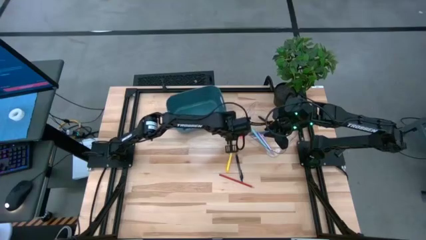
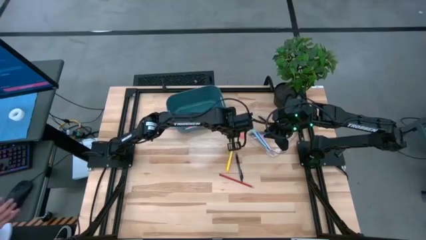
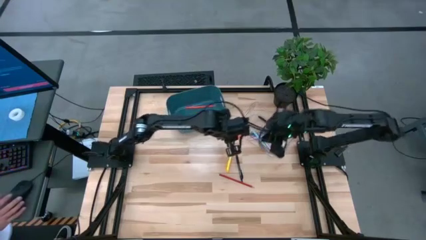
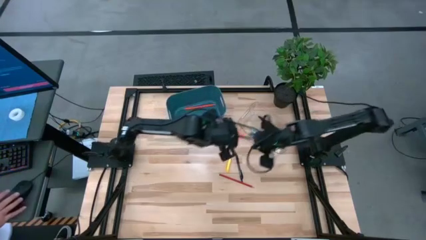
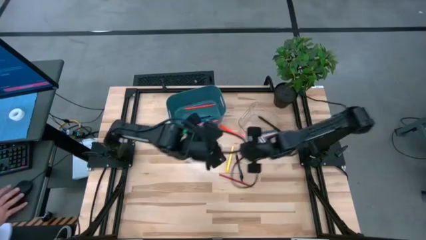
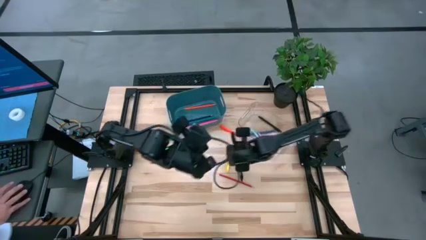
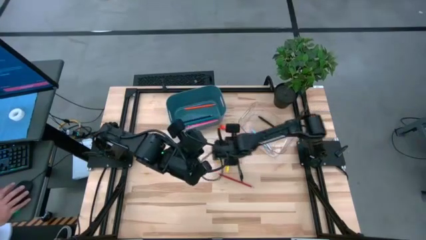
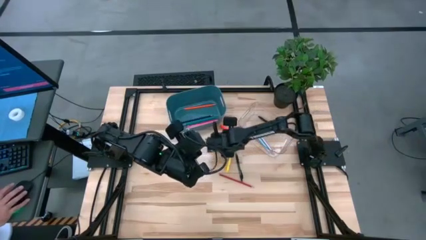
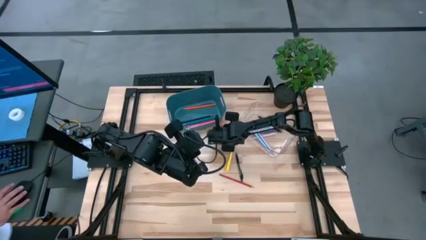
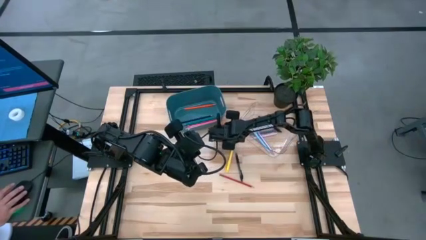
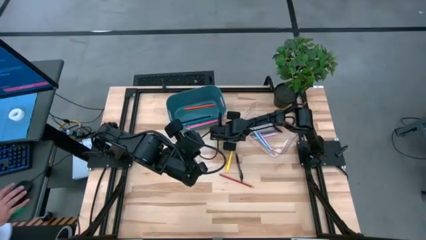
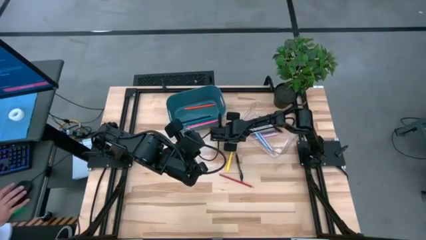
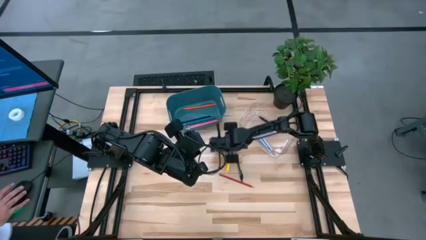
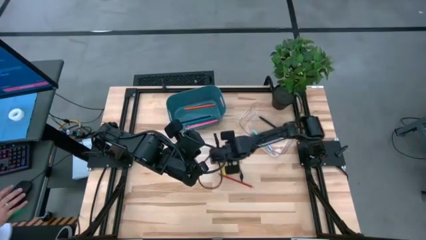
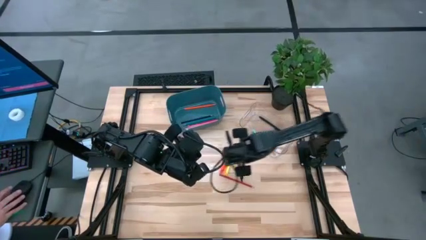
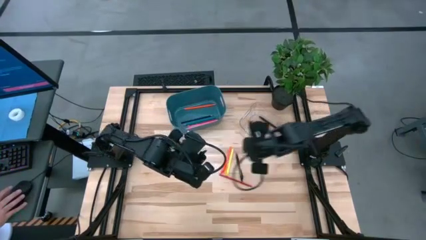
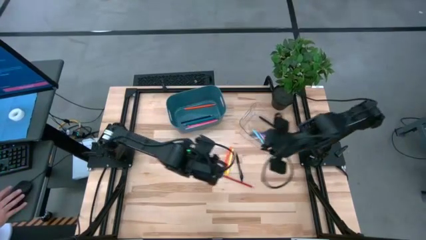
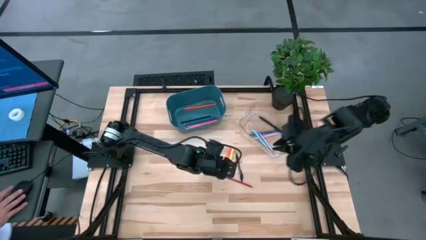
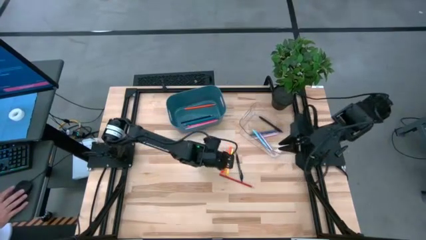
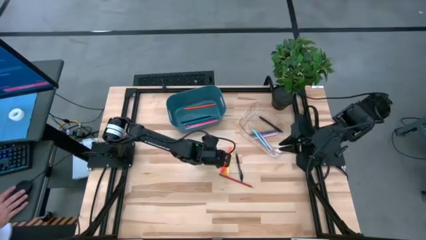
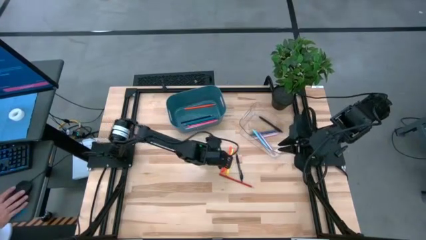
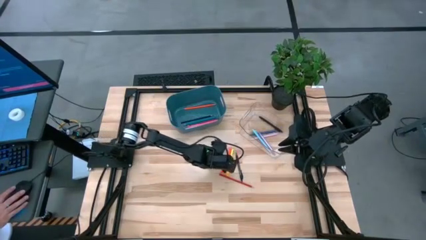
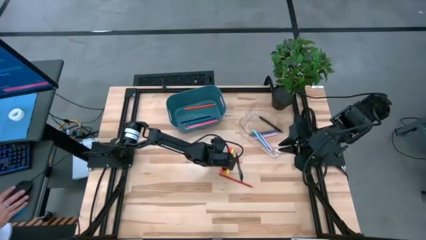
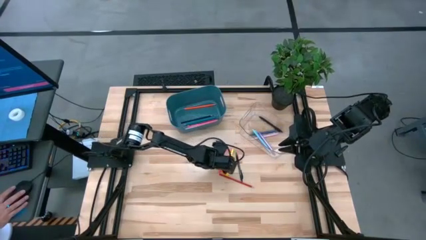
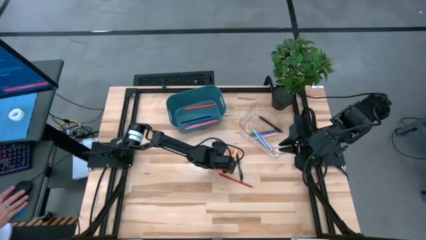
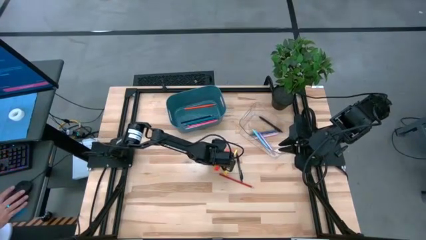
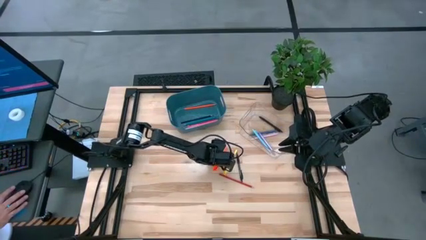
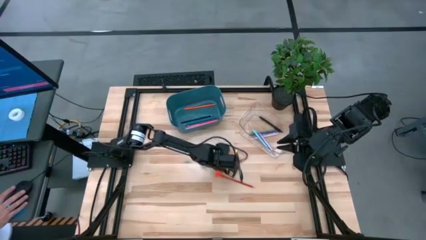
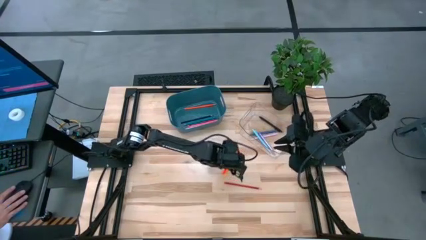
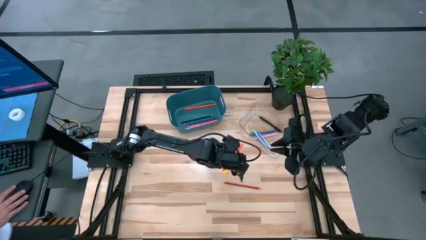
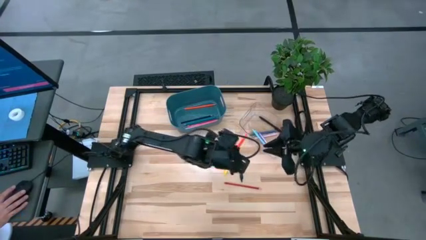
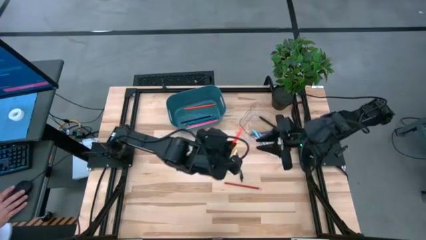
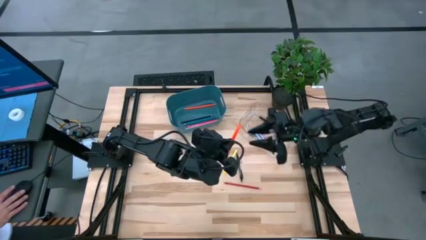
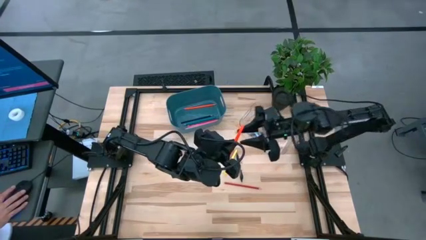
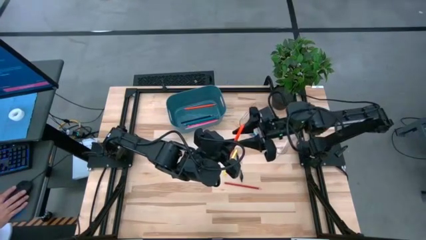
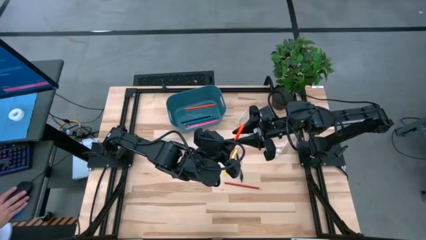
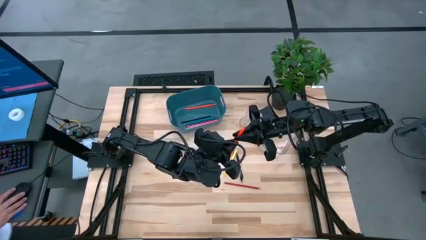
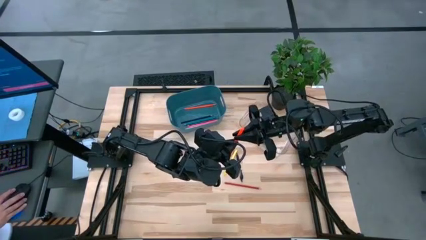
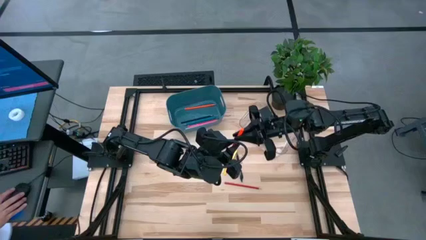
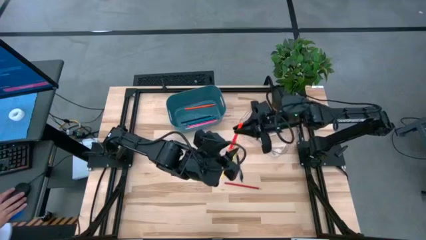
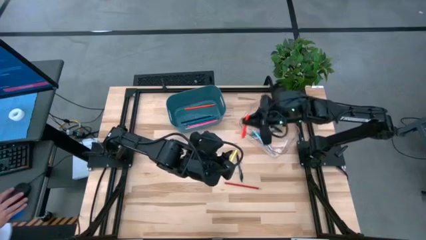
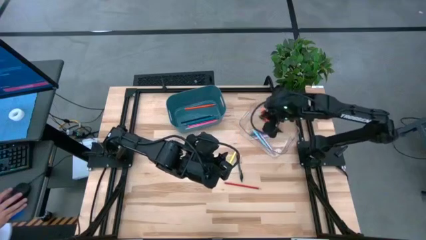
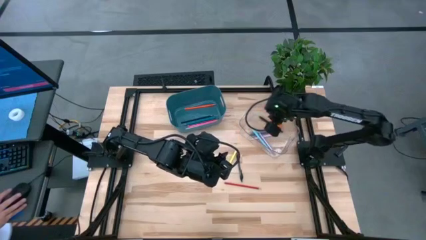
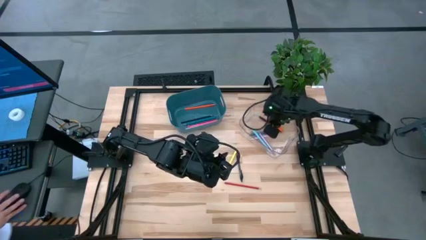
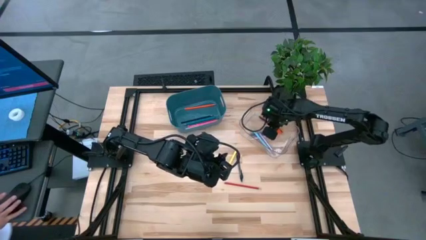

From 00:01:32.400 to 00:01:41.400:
Task: Sort pens & pencils
Put the orange pen into the transparent bin

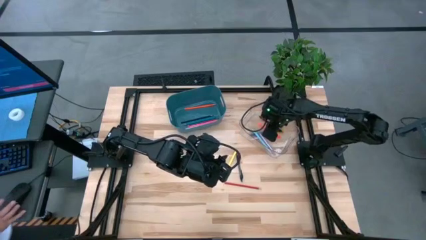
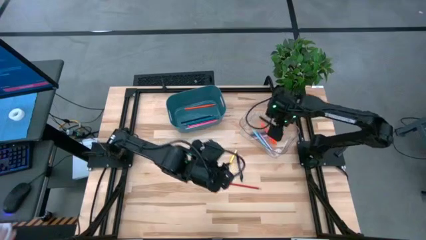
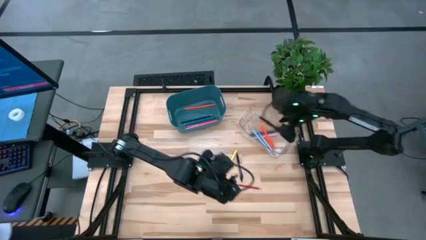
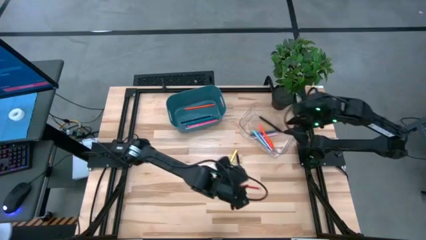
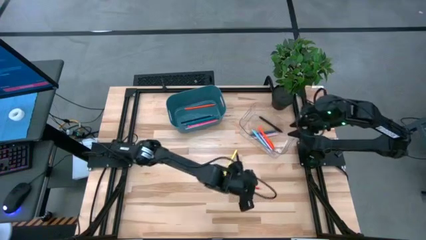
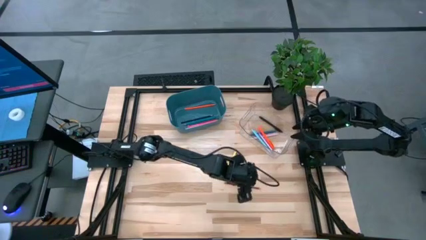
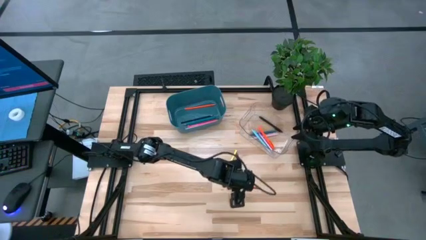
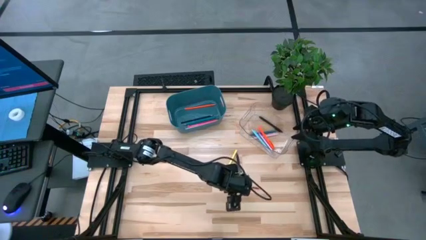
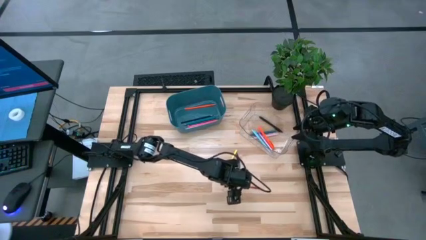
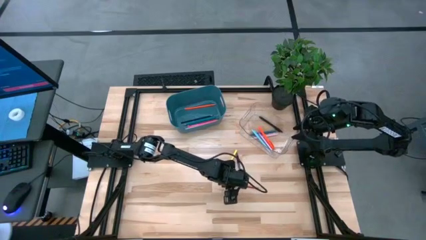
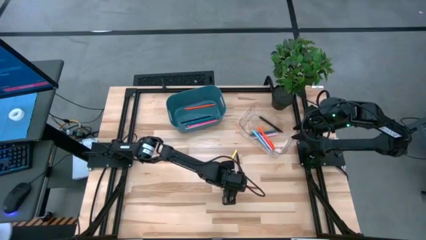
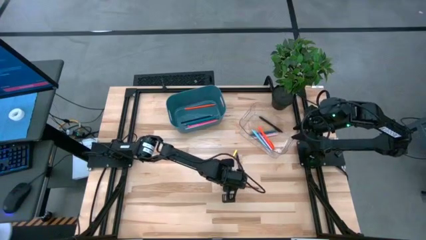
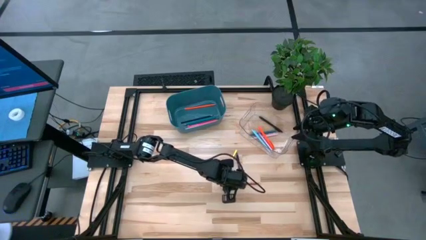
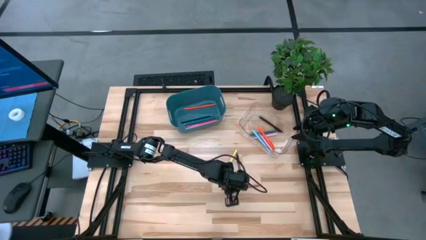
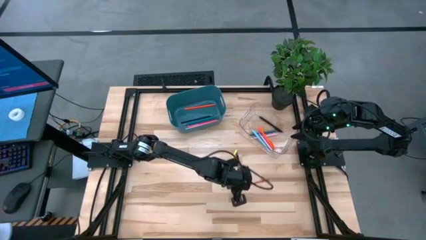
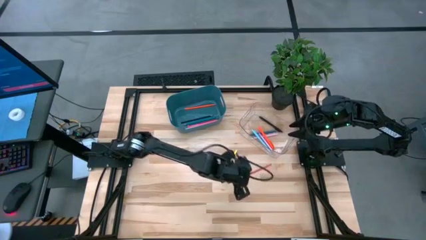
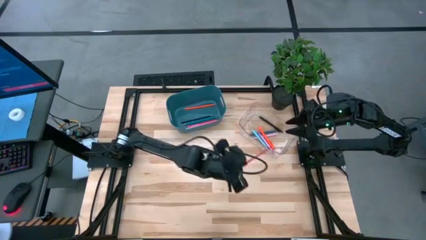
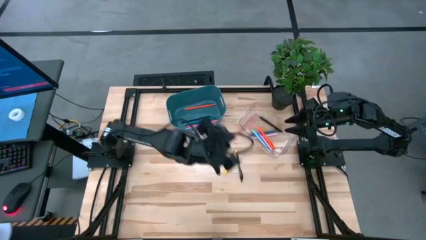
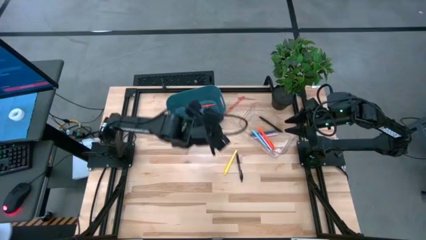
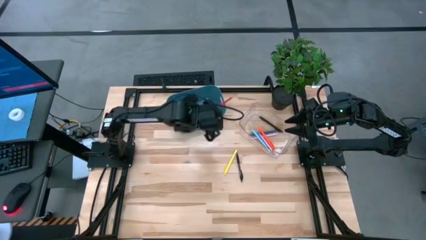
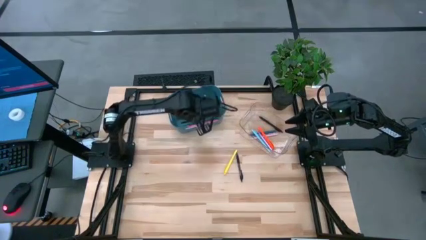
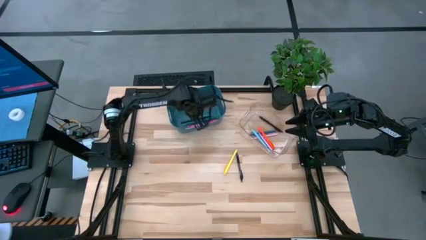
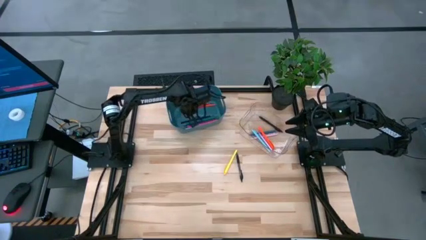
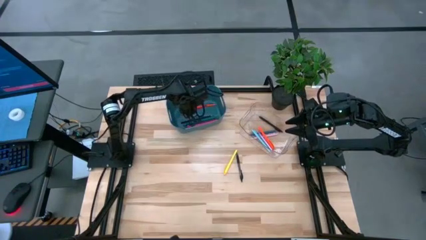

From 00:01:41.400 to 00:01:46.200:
Put the red pencil into the blue bin

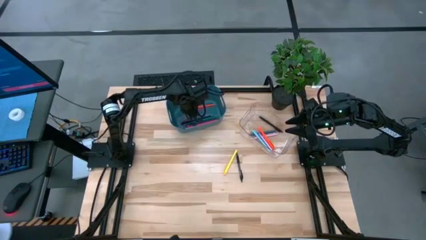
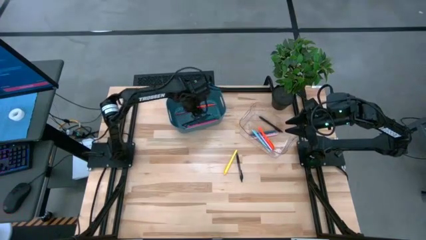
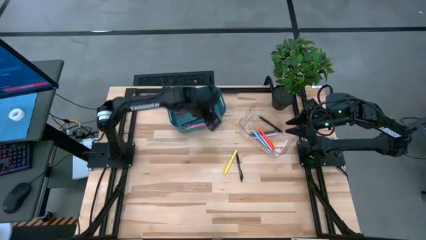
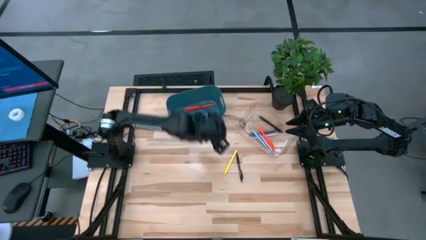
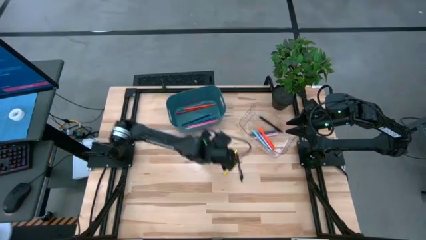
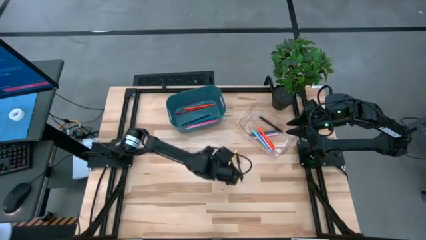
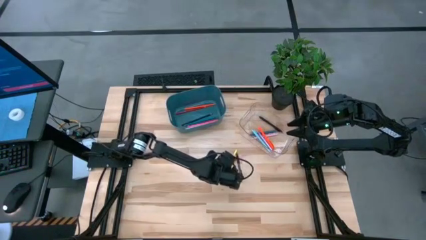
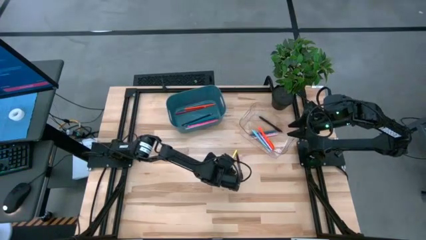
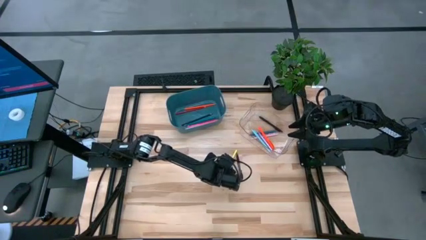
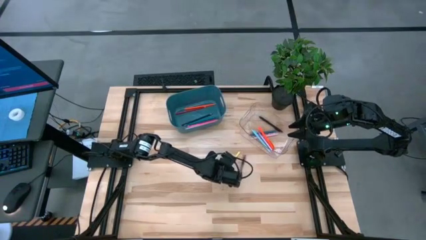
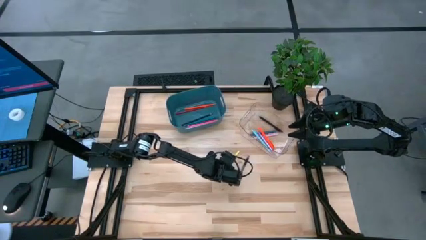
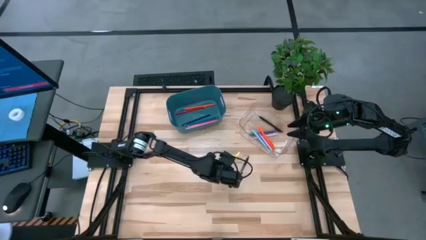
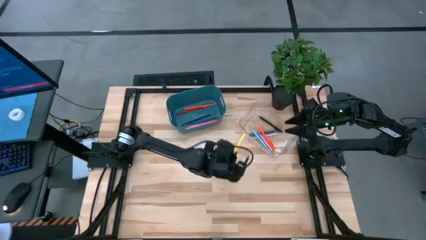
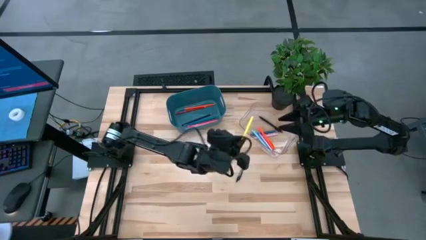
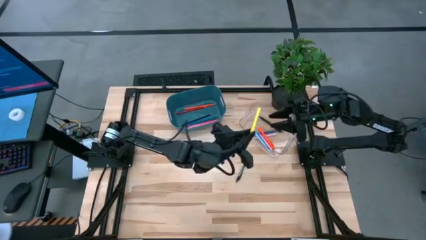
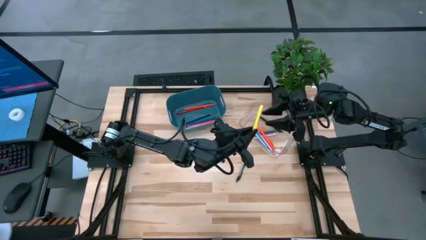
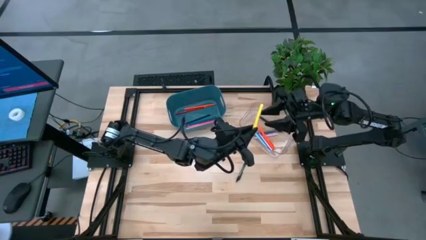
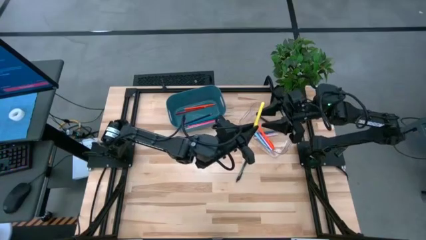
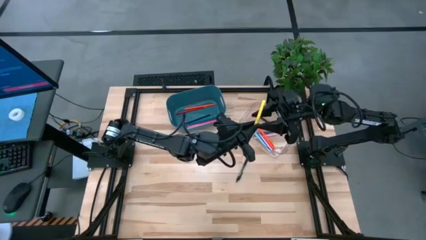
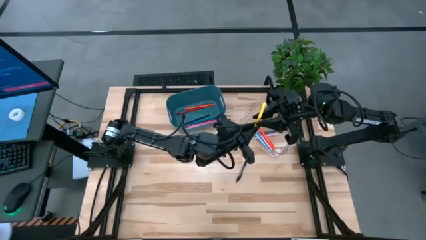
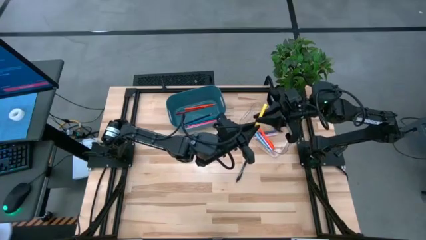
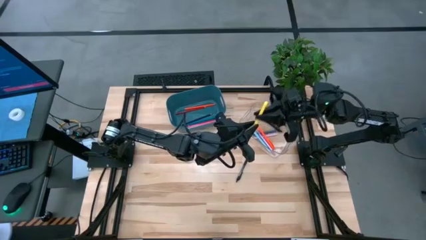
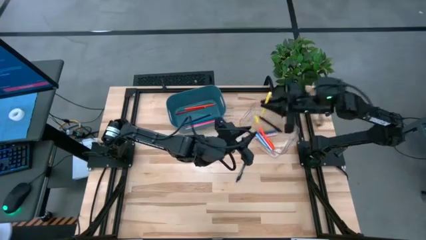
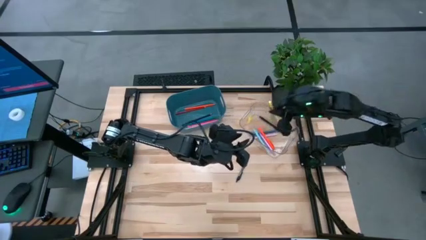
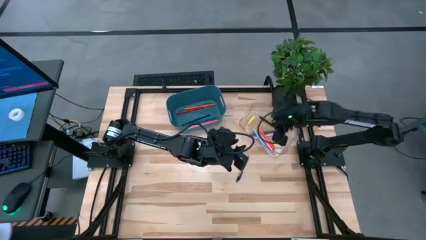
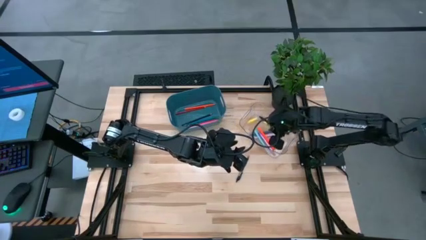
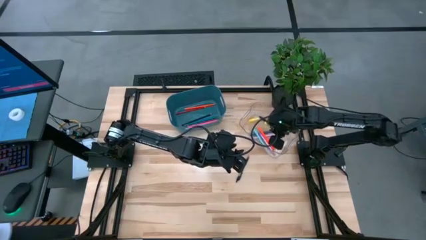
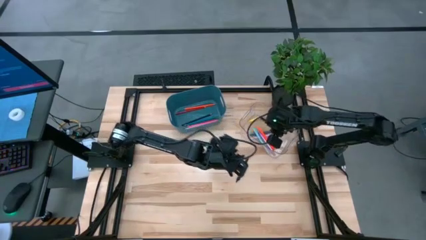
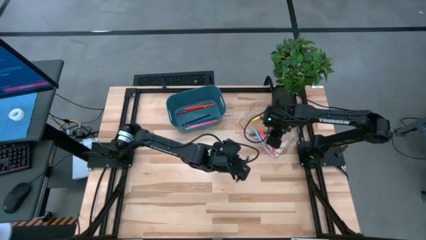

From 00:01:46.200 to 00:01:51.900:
Put the yellow pen into the transparent bin
